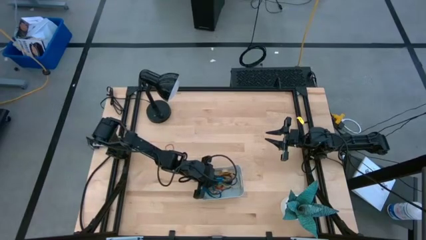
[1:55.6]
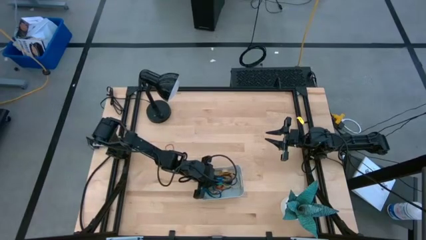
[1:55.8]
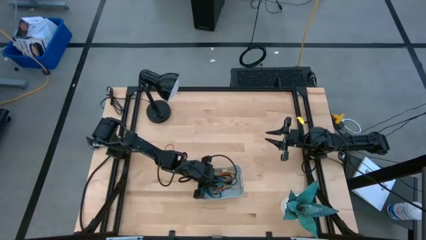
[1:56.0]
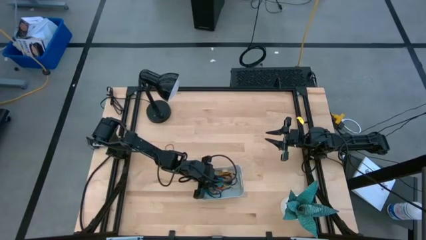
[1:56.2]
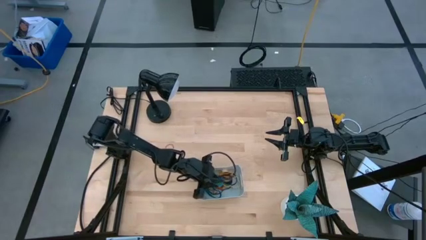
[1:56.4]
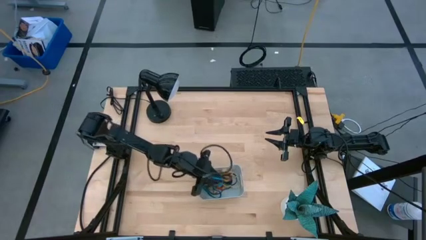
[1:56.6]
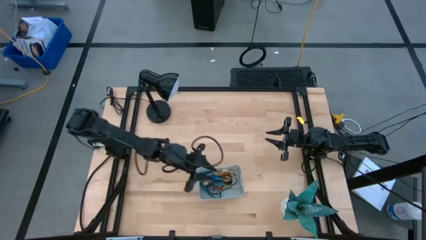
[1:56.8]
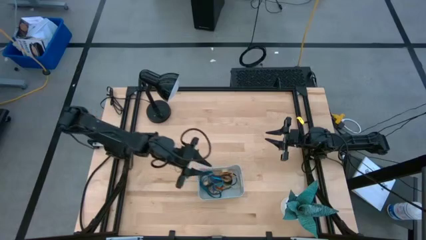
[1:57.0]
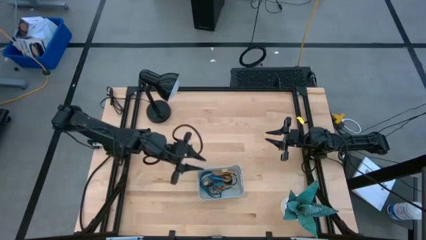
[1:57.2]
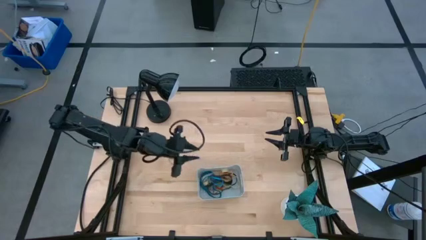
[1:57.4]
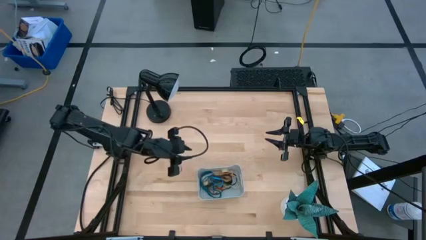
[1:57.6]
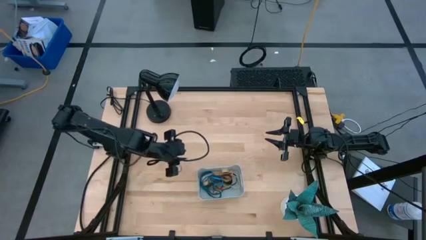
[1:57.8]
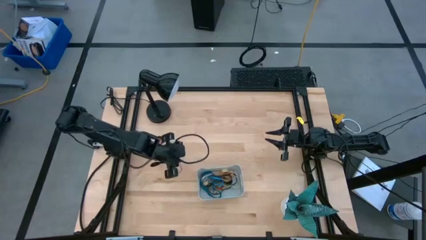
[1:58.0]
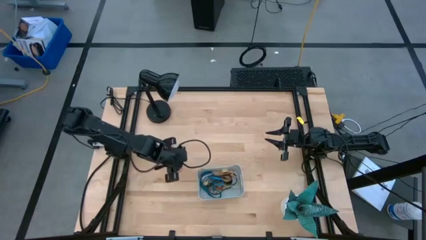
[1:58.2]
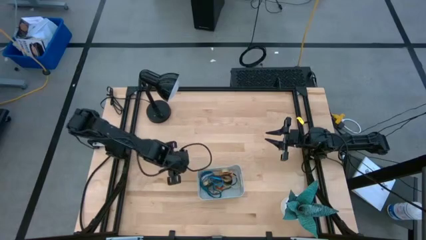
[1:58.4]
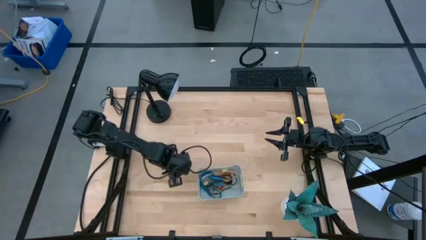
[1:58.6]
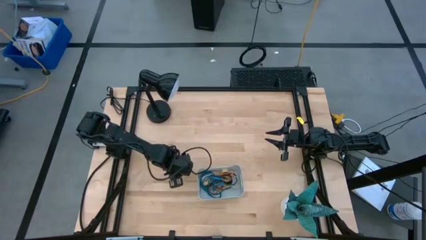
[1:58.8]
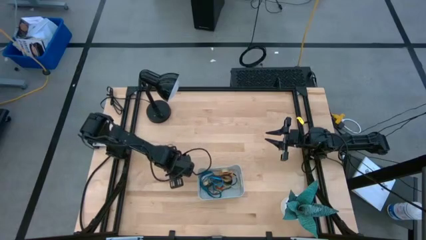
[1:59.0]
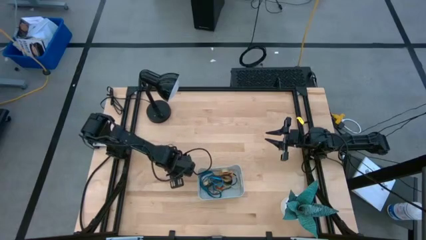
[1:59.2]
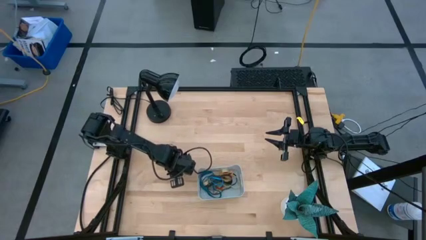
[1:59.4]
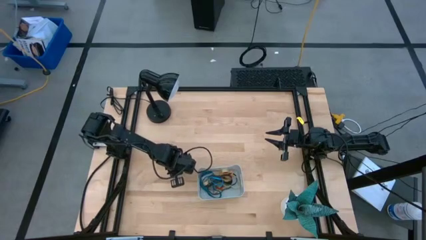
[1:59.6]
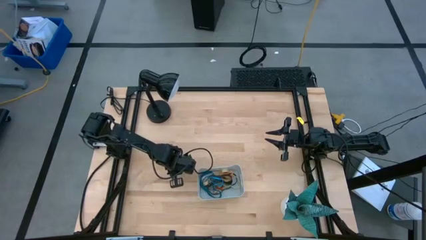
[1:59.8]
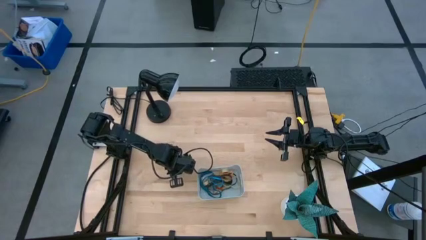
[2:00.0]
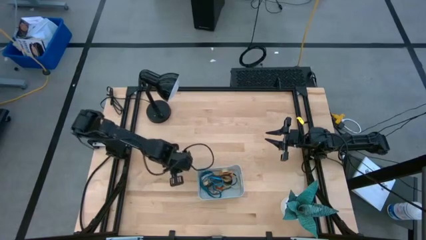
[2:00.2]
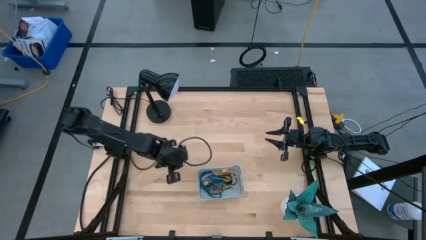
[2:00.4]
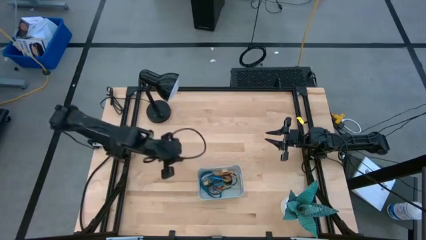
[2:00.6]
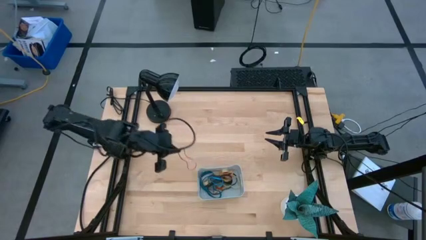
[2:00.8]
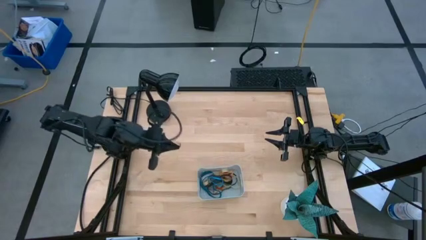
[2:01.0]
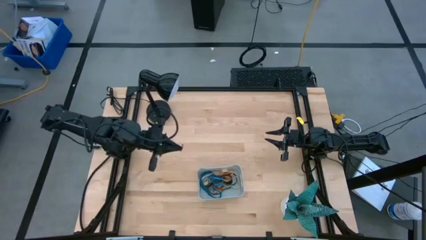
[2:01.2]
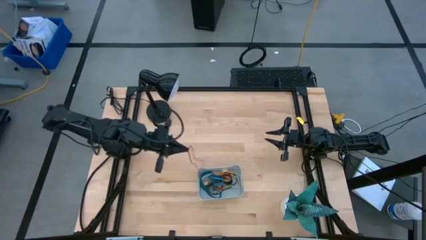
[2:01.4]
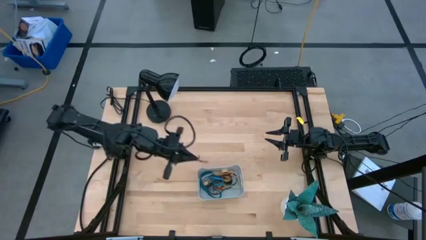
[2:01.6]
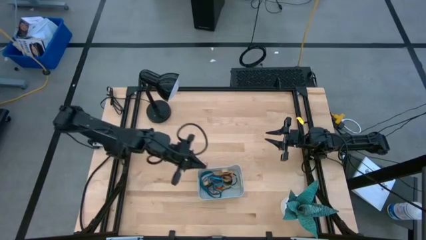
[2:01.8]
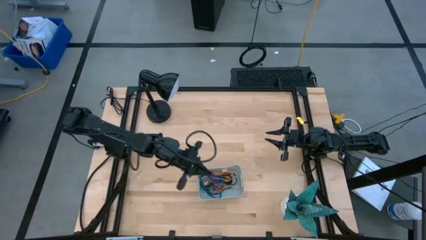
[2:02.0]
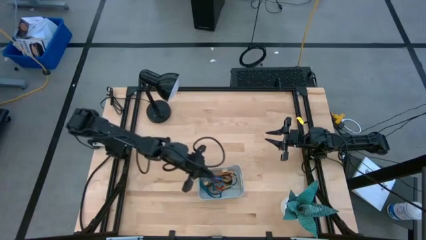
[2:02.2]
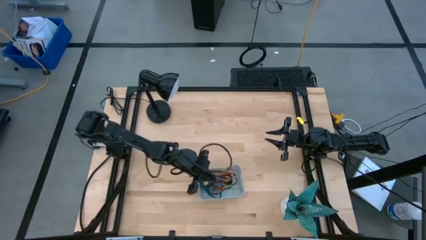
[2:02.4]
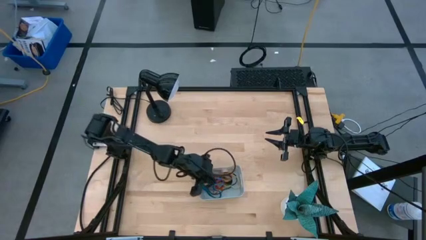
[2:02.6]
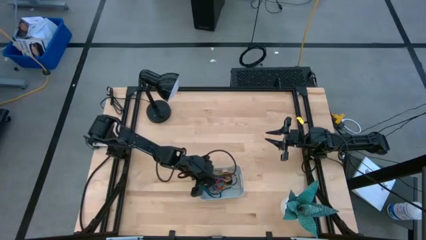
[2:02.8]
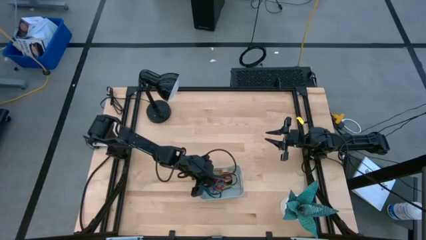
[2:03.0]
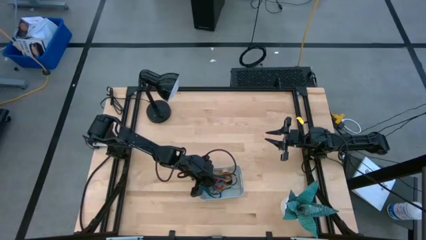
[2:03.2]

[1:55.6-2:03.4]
Task: Pick and place rubber bands into bin
Put the red rubber band into the gray bin

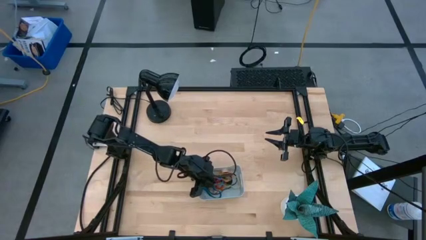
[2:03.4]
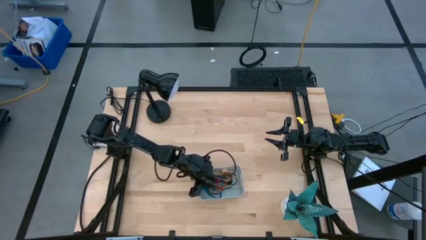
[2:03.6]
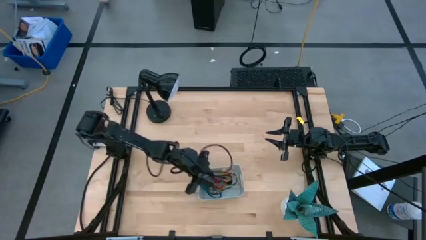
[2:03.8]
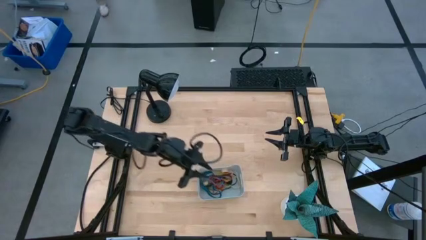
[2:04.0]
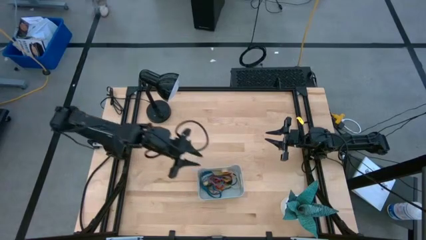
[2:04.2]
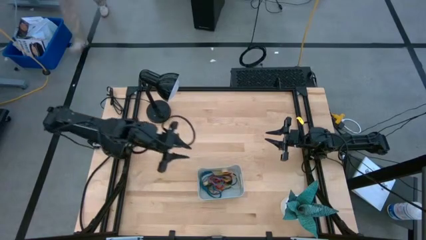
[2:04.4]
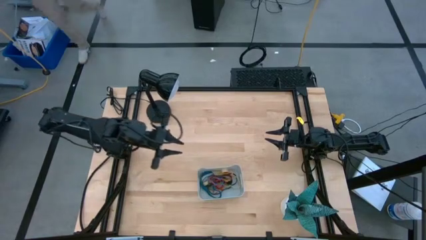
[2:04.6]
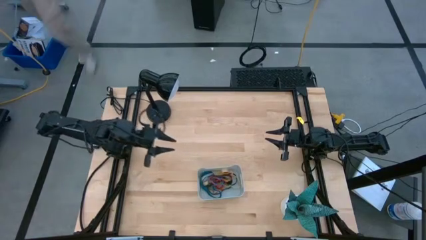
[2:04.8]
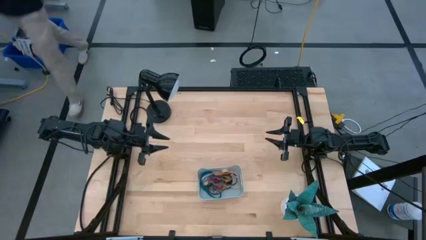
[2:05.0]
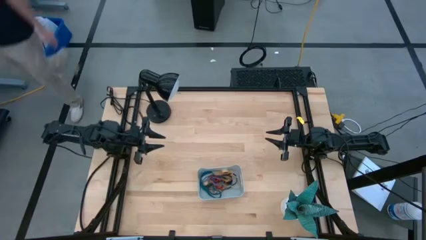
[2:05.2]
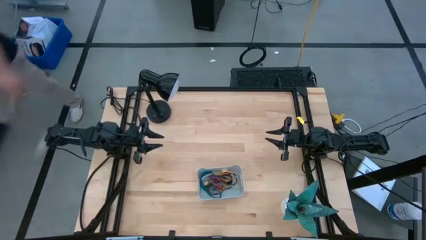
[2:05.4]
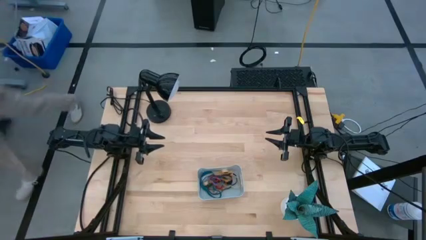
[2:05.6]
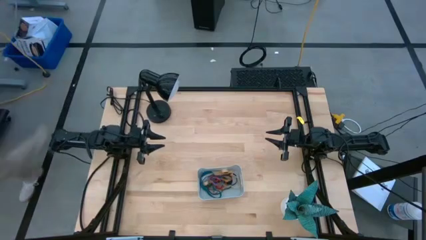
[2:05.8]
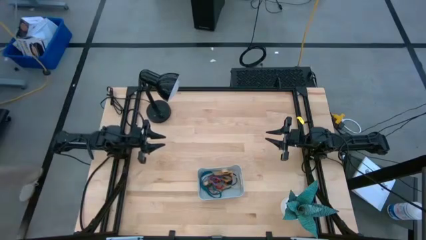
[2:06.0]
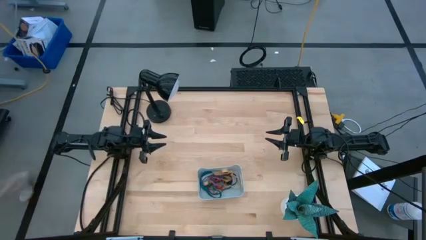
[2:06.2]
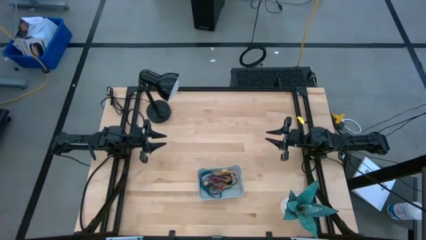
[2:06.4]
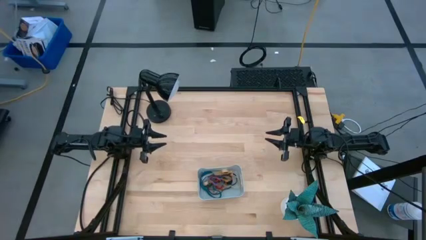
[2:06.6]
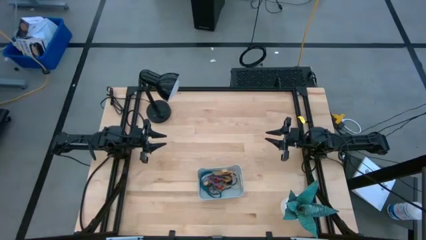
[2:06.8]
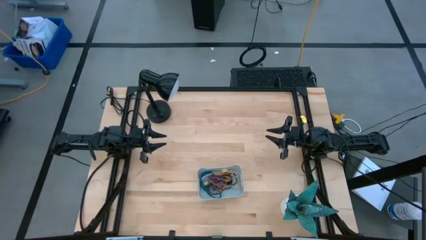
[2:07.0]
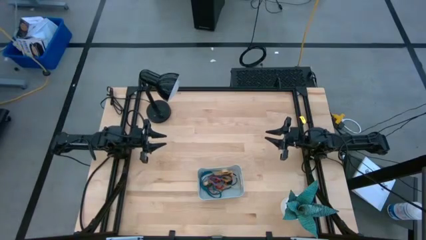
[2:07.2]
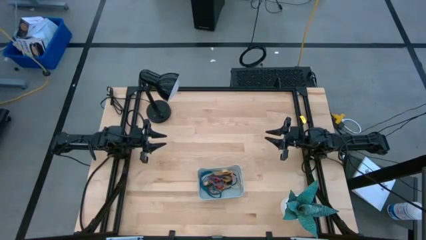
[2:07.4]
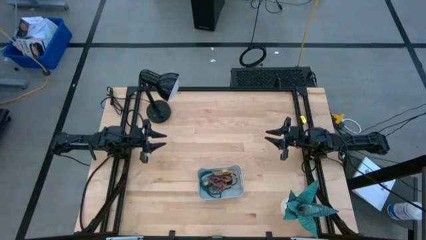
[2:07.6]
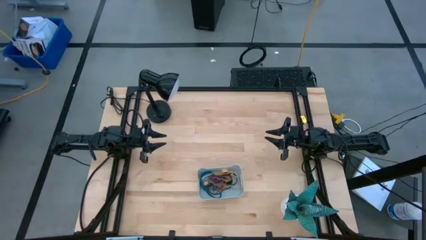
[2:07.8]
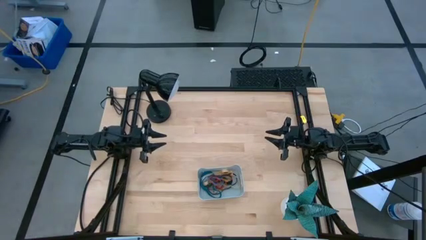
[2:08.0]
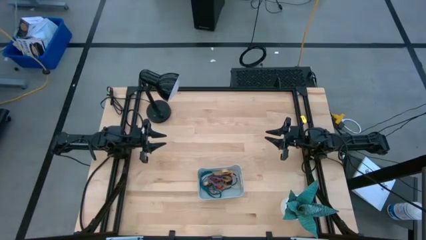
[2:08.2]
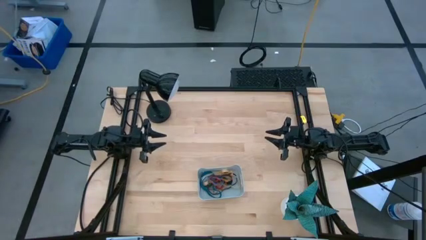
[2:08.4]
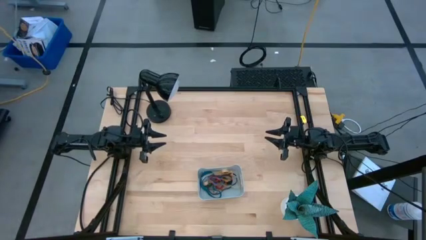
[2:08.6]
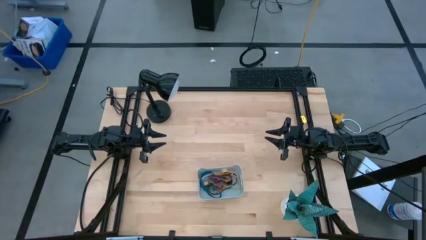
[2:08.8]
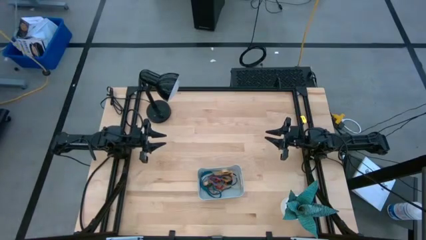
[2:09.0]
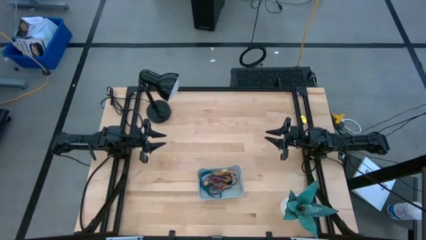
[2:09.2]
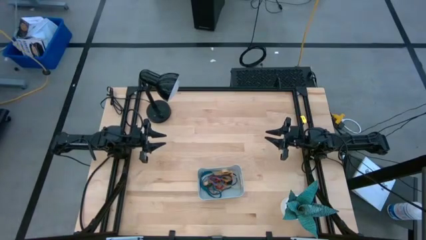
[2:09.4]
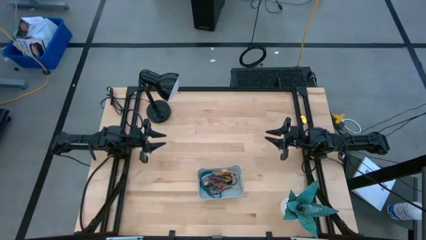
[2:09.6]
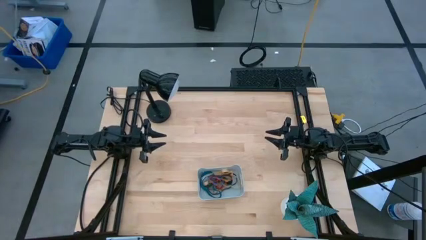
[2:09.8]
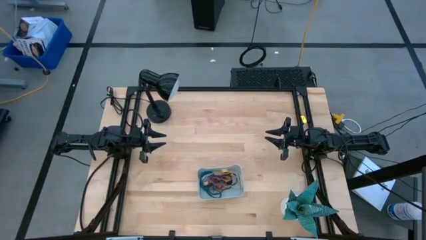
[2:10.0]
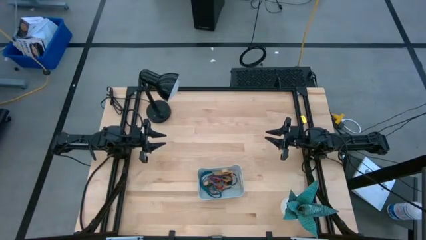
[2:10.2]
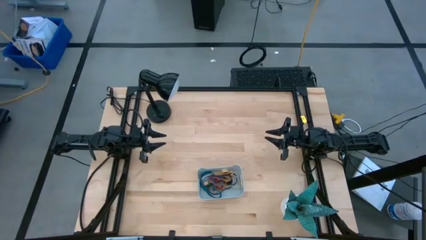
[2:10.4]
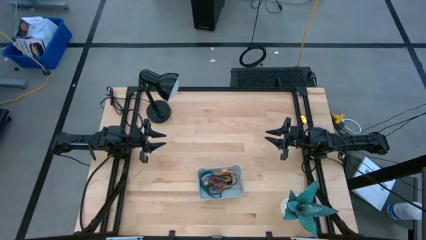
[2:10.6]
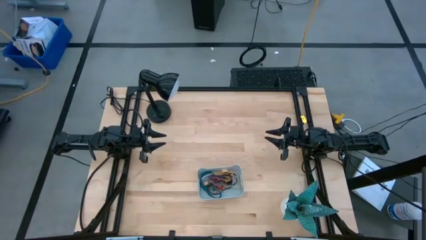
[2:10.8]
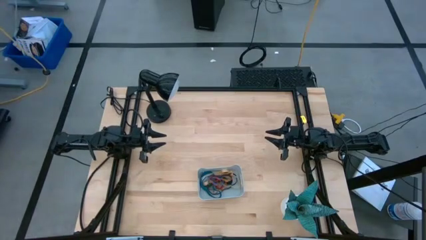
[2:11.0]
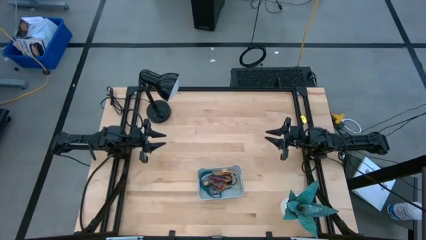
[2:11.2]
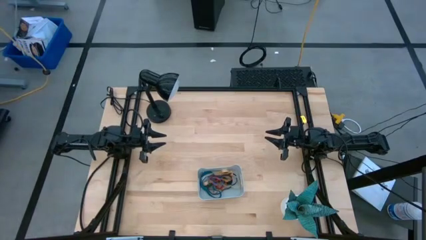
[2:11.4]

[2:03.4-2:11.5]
Return to Home Position

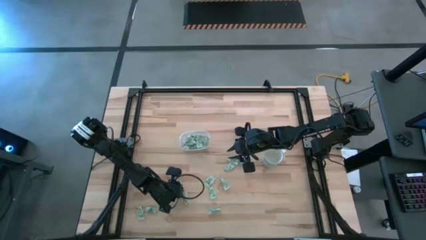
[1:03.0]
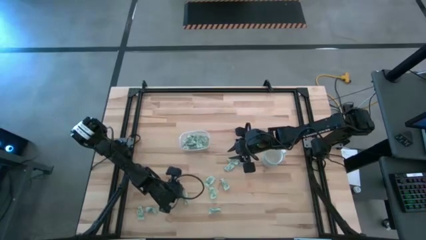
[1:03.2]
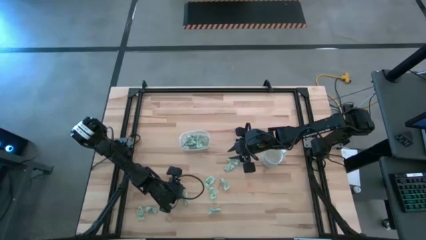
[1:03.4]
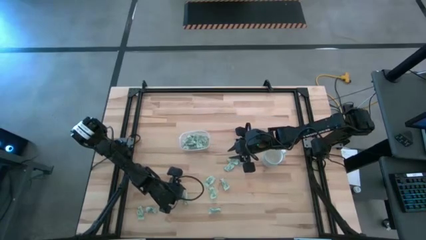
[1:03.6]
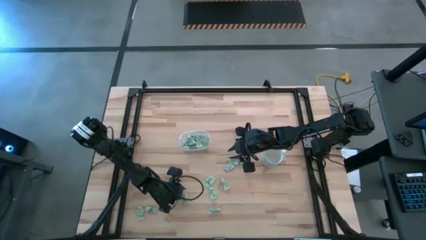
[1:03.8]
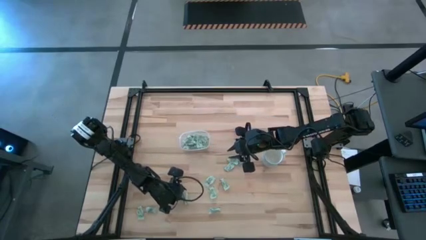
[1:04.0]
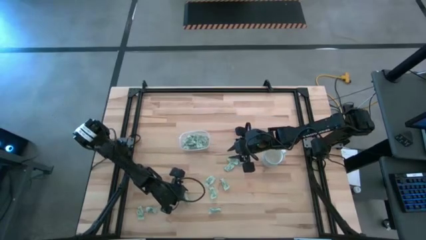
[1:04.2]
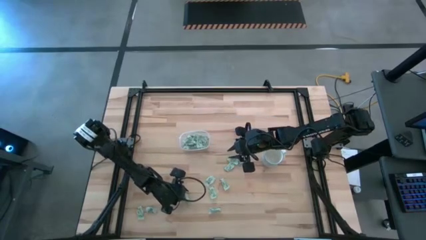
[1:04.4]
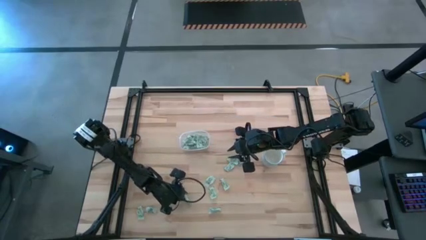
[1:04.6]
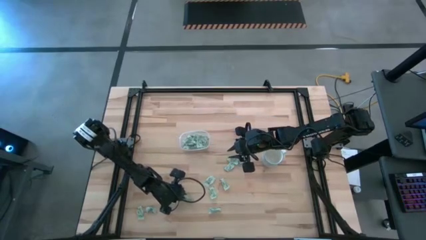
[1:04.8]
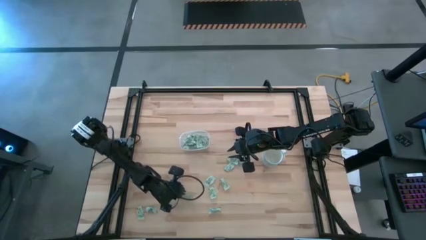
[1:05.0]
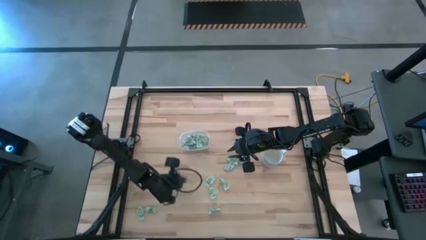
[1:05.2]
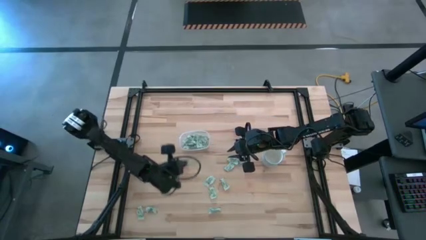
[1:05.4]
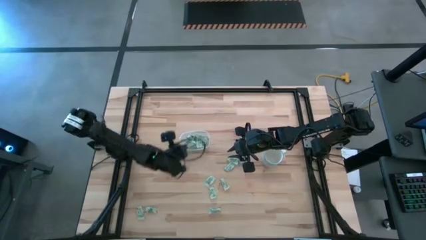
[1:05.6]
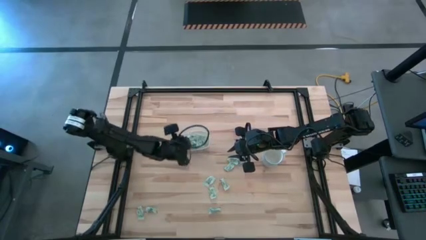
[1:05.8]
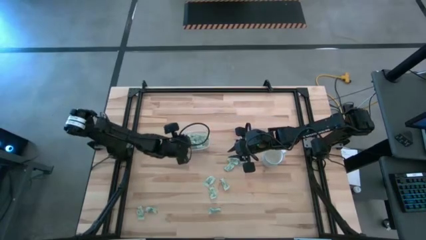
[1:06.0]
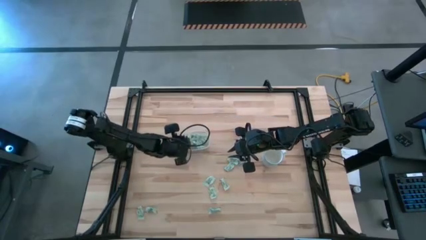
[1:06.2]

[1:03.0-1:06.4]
Task: Pick and place Stevia / Truvia into bins
Put the stevia packet into the transparent bin
